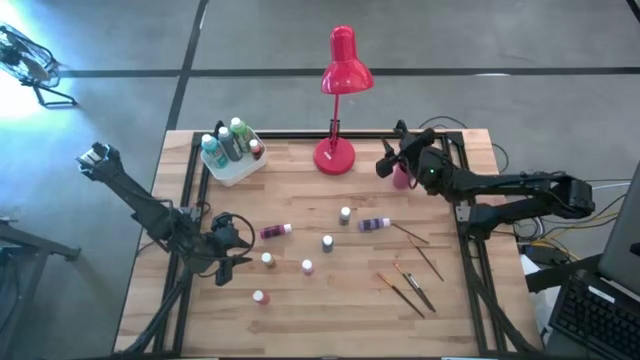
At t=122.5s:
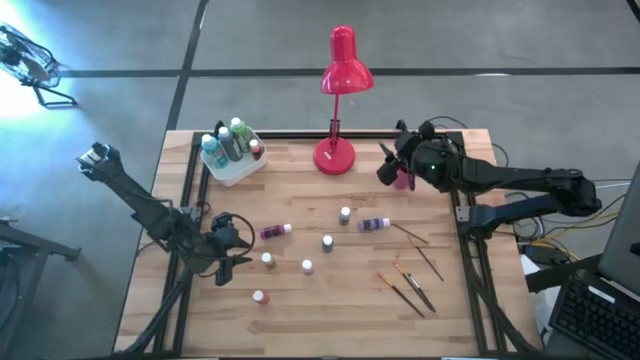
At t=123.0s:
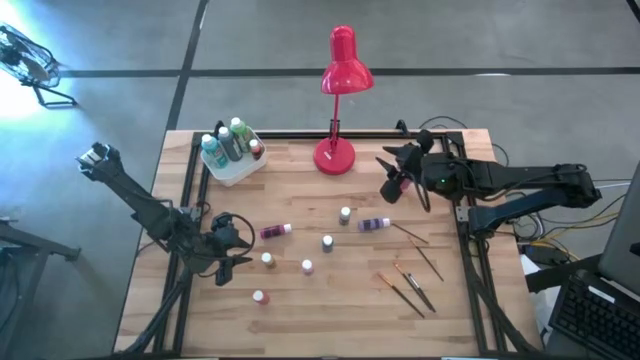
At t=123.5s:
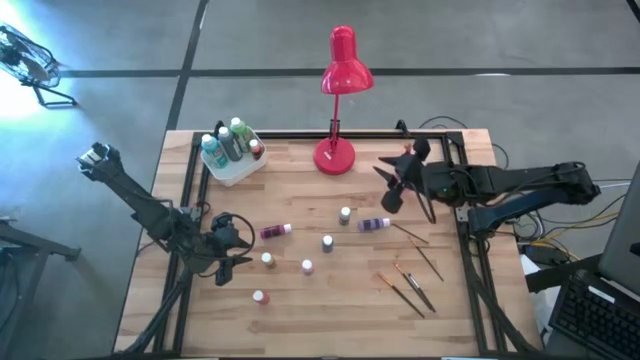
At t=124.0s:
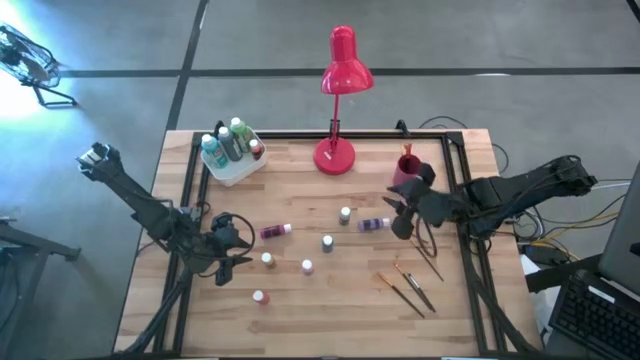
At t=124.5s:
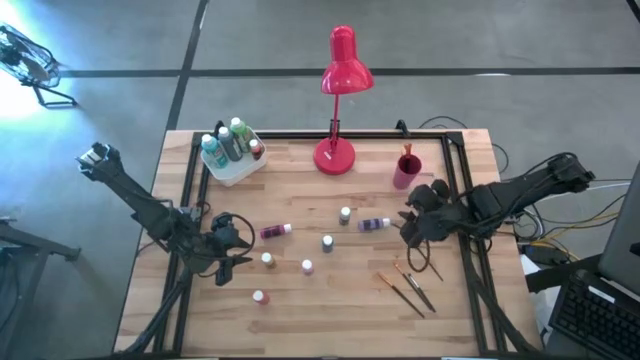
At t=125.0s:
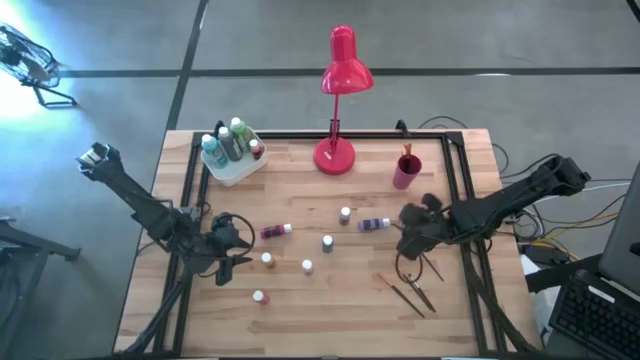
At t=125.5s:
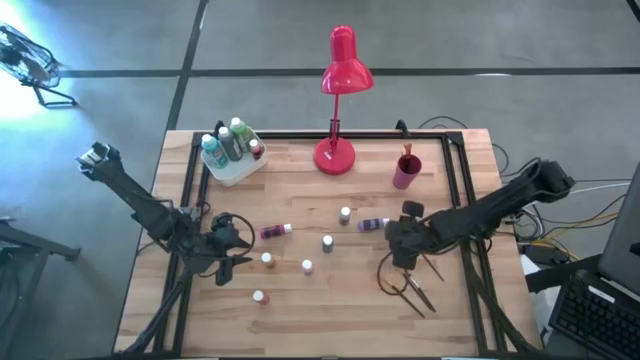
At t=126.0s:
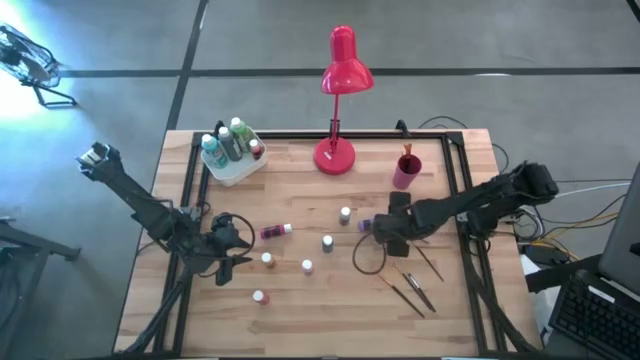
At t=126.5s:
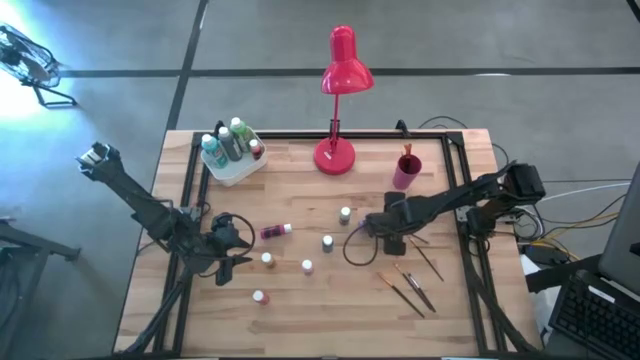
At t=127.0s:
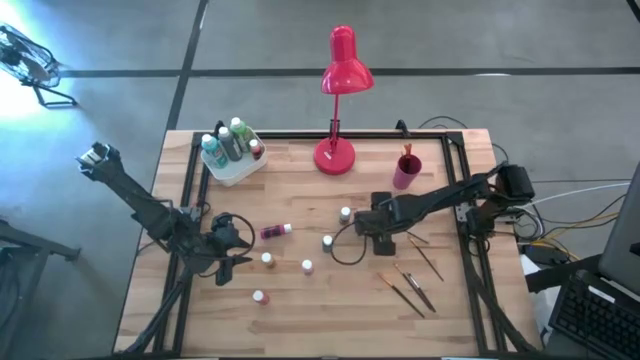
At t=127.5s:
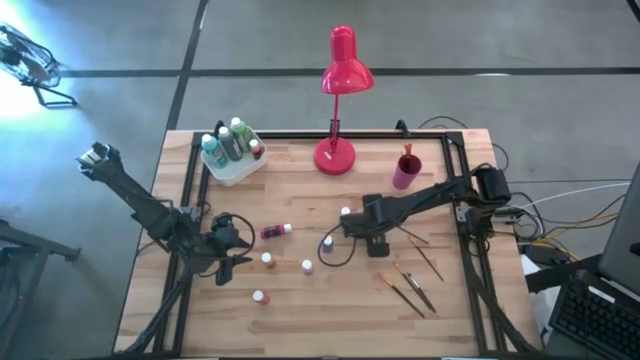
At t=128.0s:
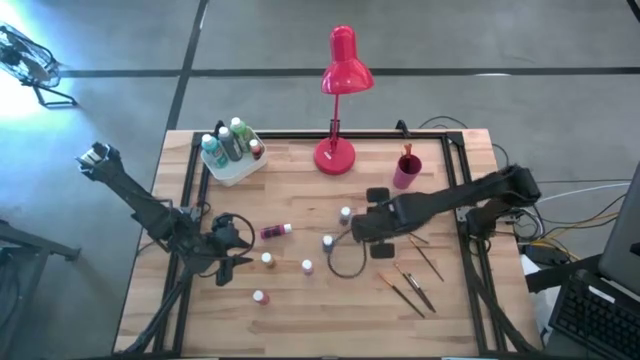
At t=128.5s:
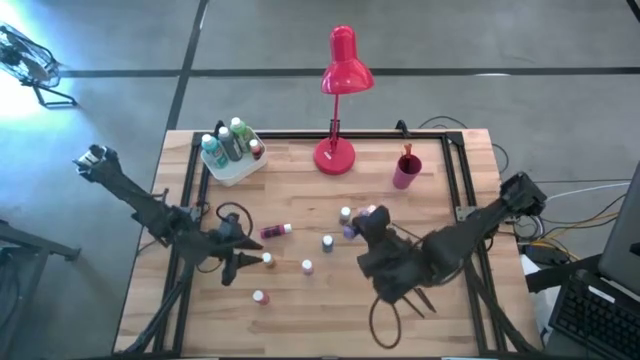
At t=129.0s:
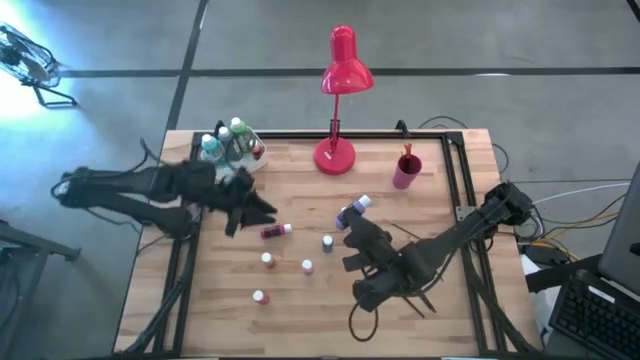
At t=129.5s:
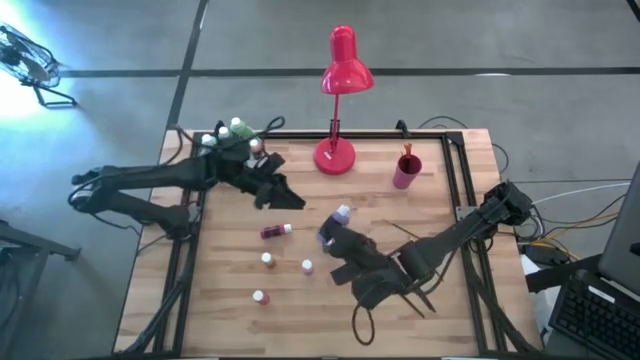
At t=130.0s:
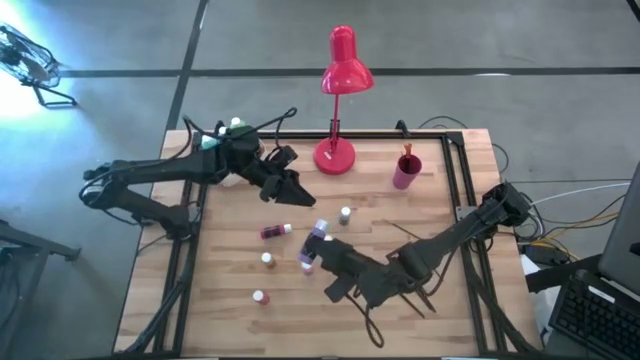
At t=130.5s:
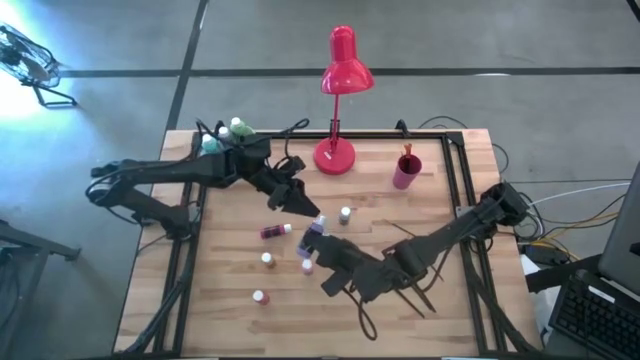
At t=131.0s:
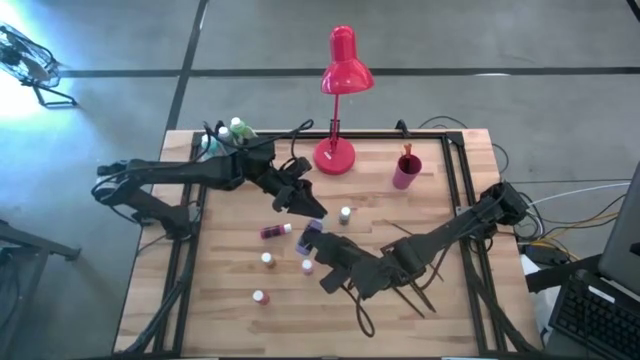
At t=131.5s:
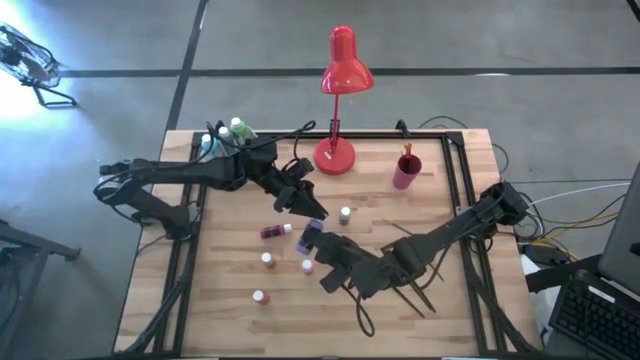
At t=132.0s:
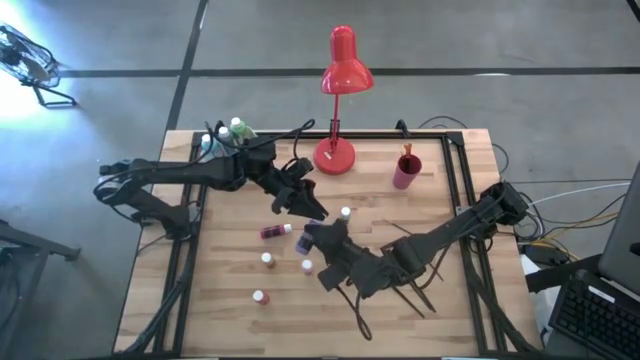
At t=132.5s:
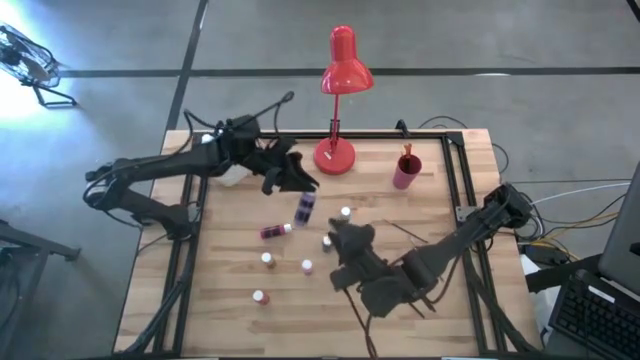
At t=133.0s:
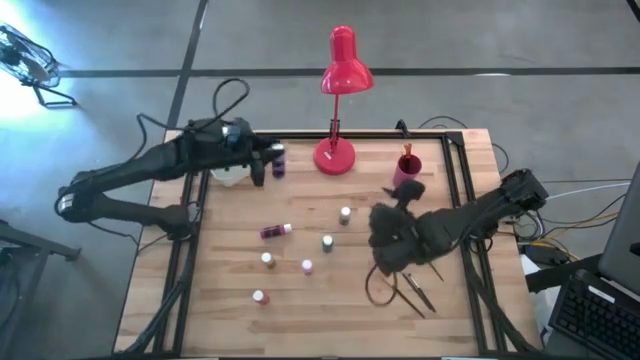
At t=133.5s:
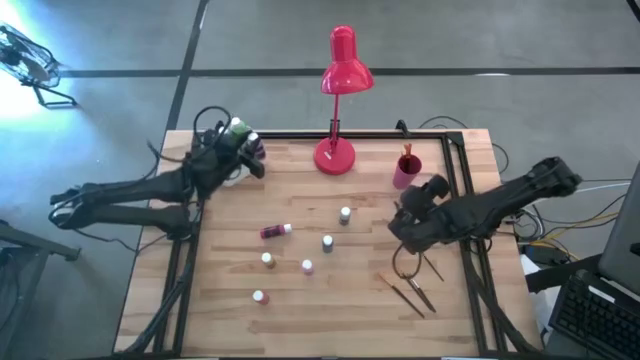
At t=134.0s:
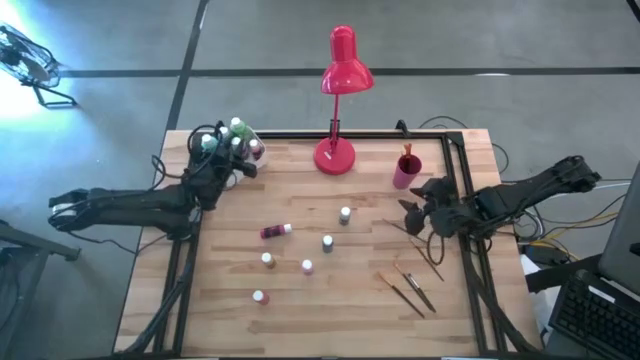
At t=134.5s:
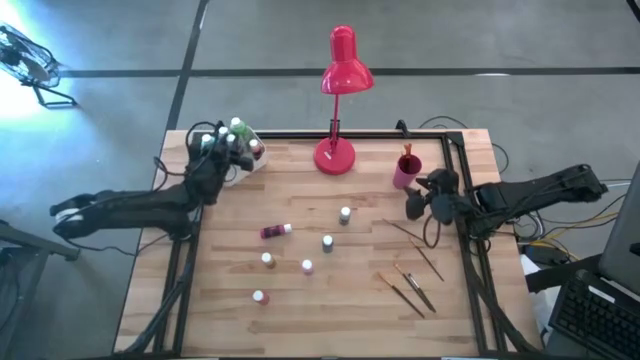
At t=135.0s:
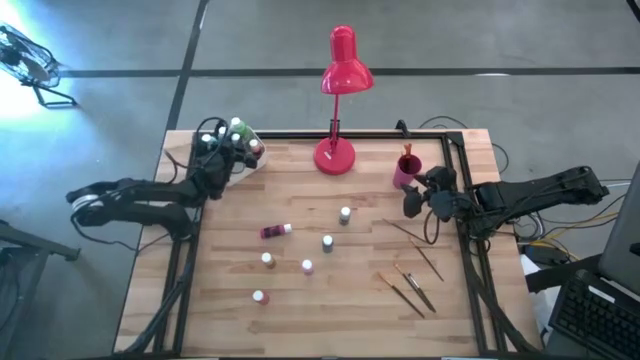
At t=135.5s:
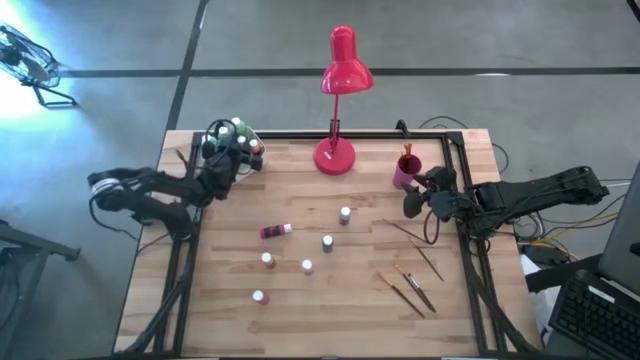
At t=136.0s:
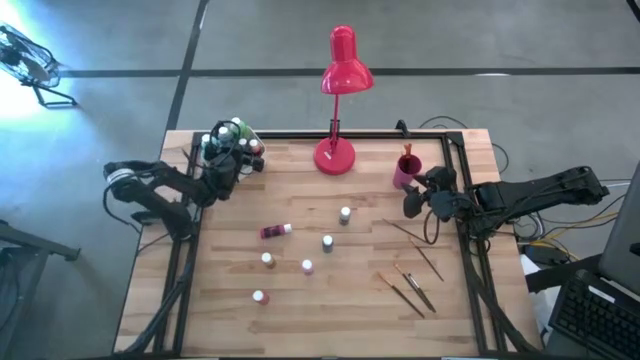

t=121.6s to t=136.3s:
Task: Pick & Place Paint Supplies
Put the purple paint bottle into the white bin
